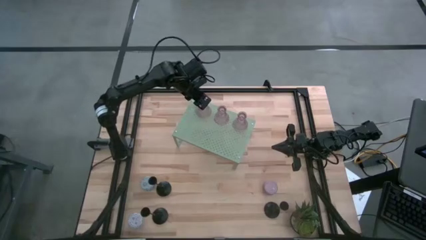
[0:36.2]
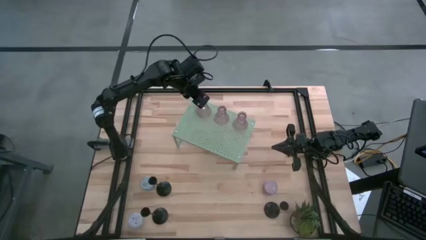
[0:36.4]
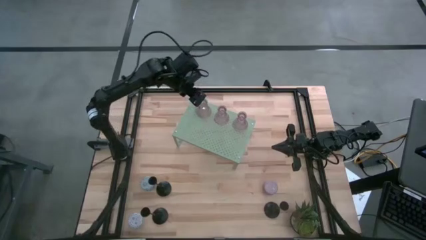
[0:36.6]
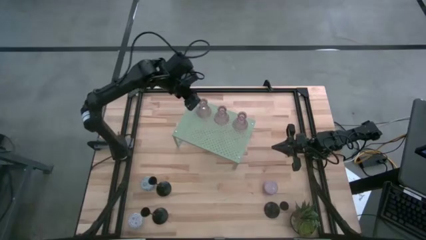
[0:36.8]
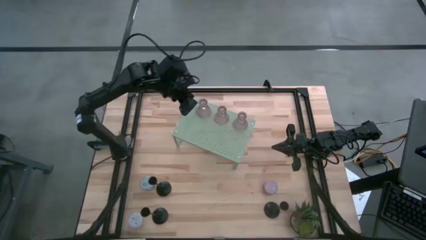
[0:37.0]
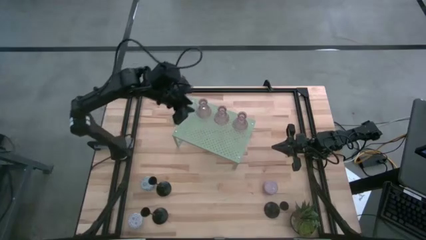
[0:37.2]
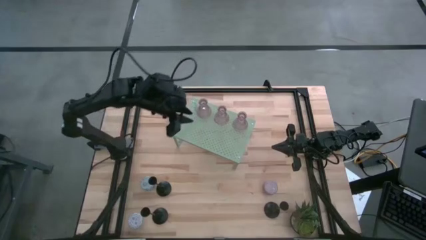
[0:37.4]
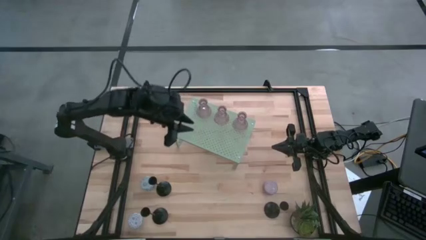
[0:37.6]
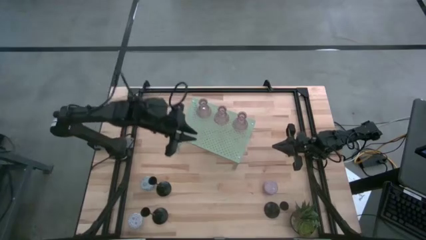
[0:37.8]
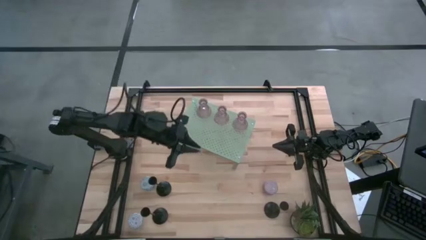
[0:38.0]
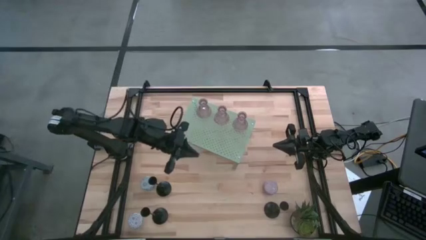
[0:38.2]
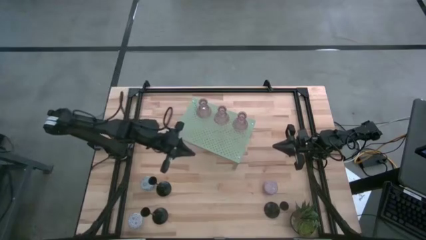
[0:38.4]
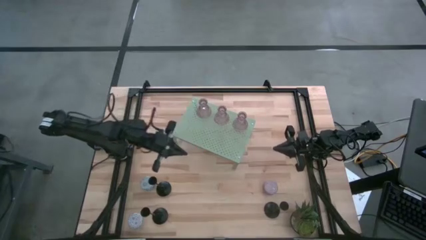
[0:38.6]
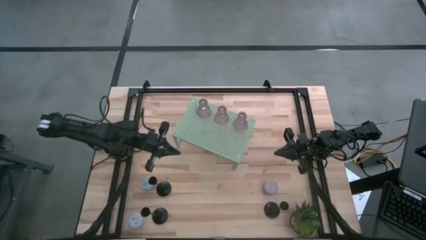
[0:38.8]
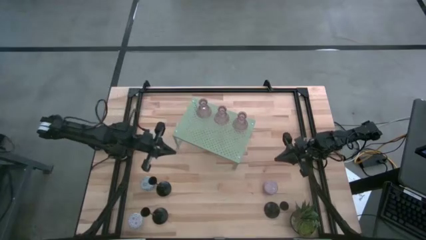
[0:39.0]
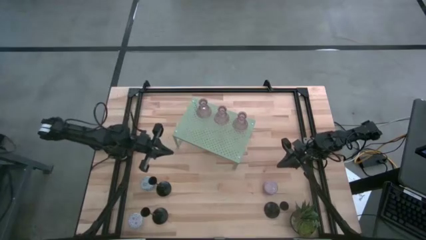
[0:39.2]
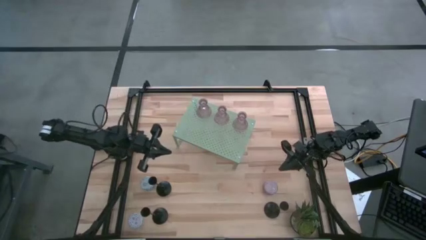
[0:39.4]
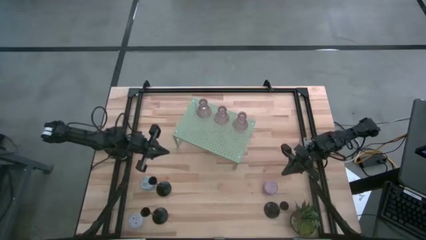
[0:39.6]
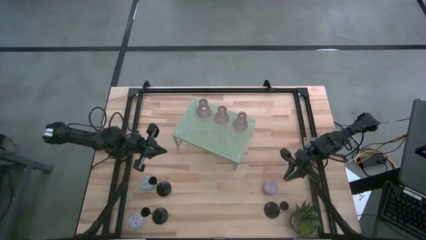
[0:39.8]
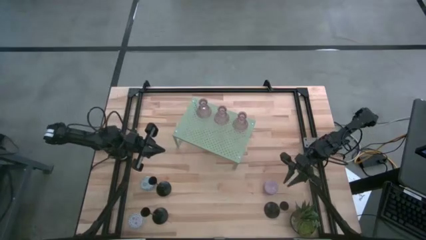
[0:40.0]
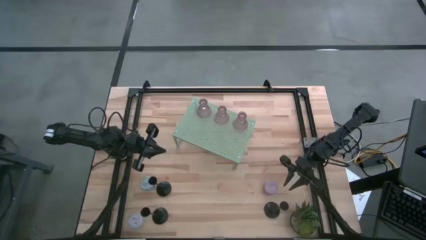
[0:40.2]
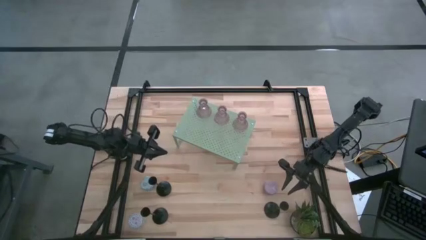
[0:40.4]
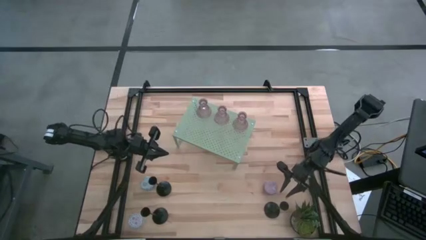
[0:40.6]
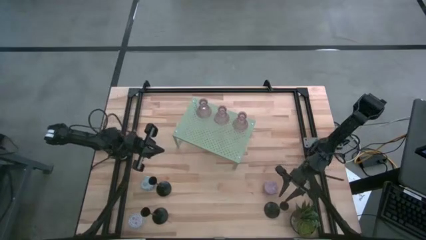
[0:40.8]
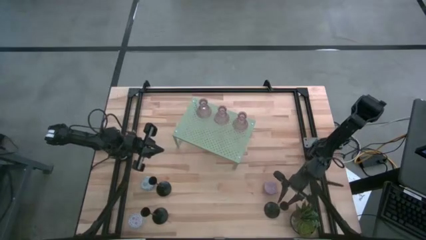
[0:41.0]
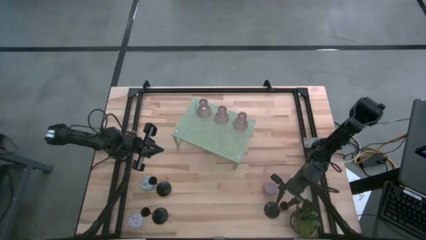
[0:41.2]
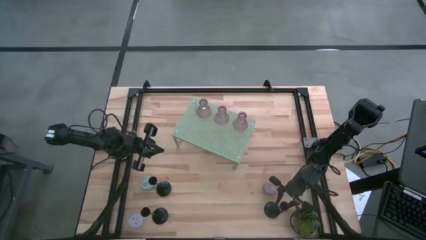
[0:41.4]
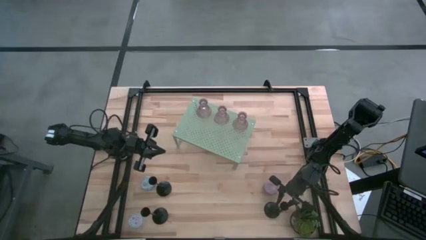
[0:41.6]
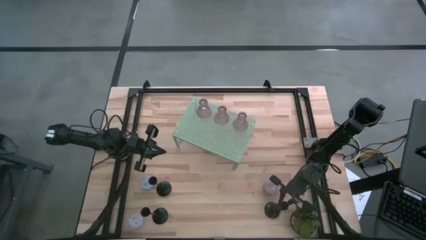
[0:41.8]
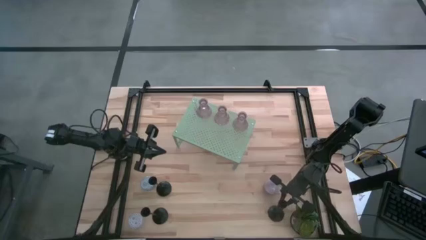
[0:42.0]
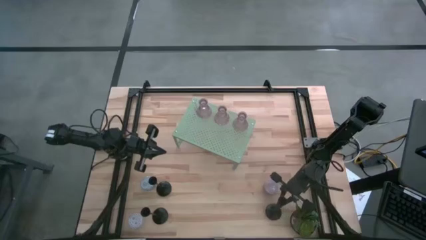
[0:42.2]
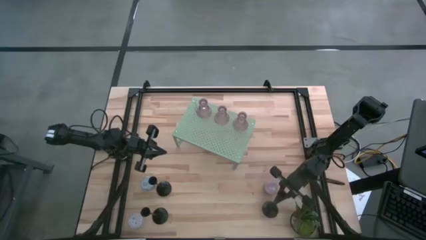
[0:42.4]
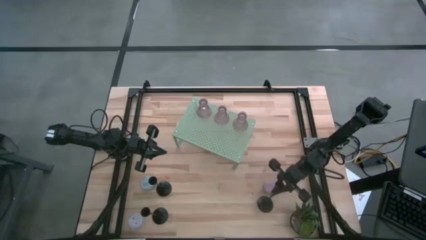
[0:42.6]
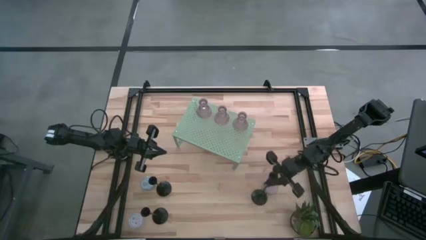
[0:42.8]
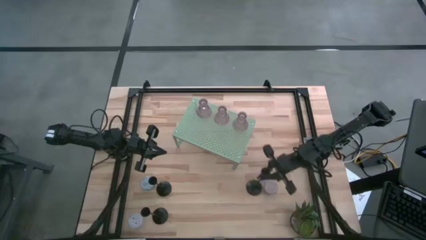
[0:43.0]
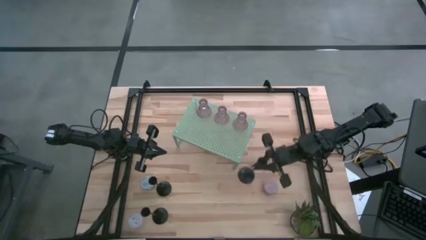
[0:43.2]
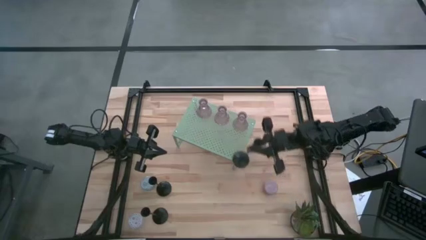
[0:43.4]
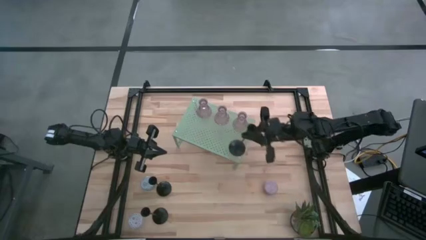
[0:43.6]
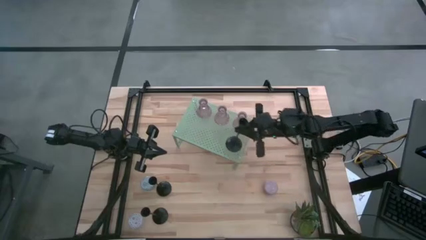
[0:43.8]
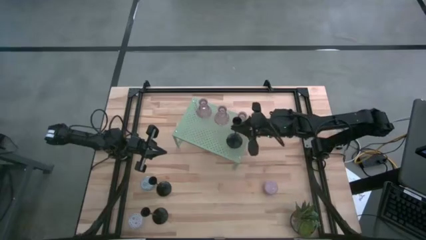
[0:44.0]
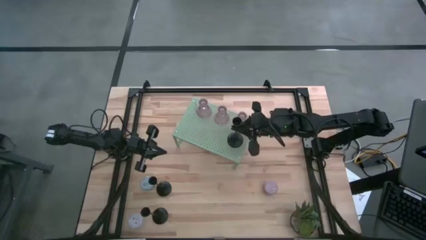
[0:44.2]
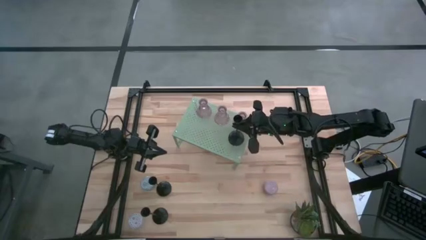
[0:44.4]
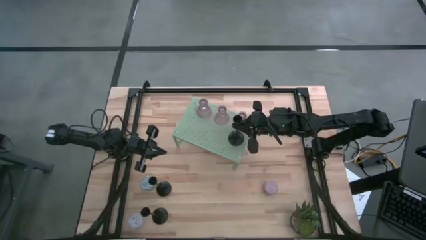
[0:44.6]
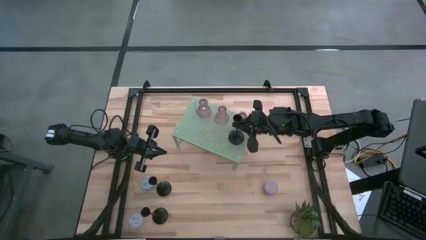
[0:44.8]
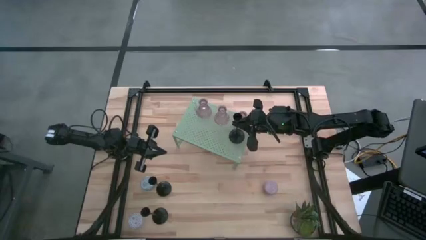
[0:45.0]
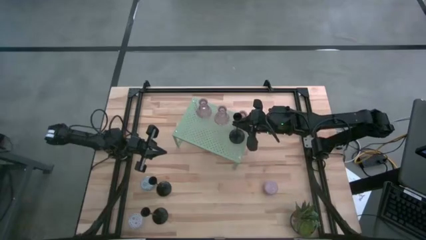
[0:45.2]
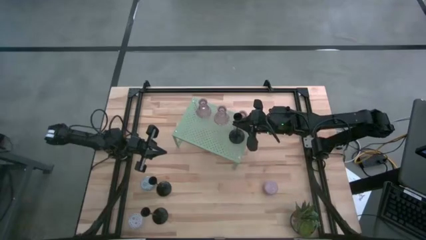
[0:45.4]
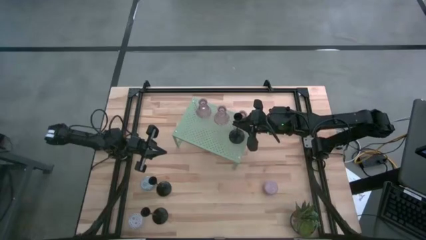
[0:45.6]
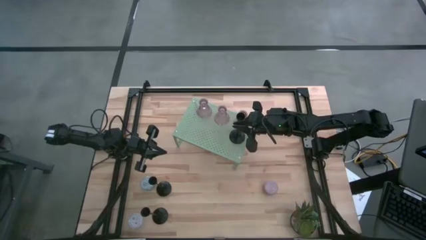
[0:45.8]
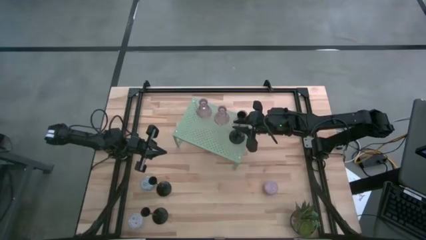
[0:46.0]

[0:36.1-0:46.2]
Task: Pick & Place candle stick holders
Put the bottom right black candle holder on the shelf
